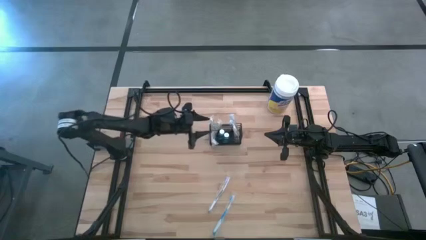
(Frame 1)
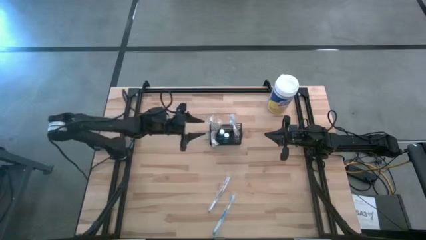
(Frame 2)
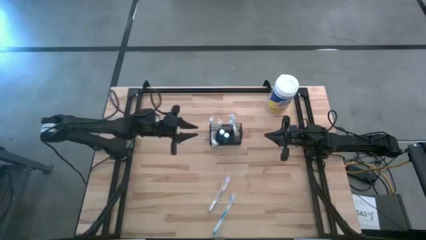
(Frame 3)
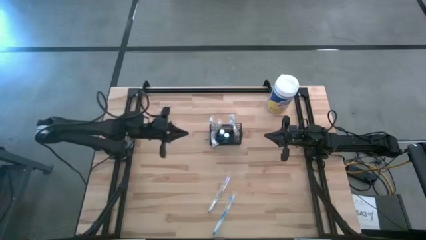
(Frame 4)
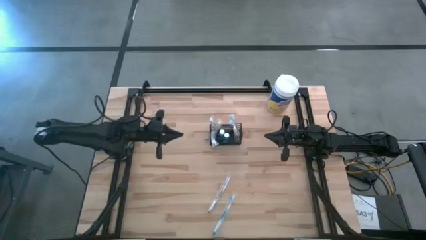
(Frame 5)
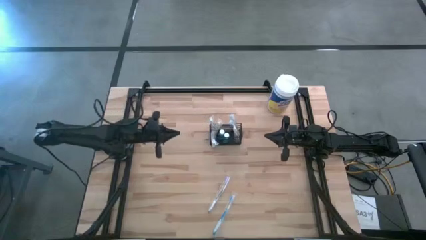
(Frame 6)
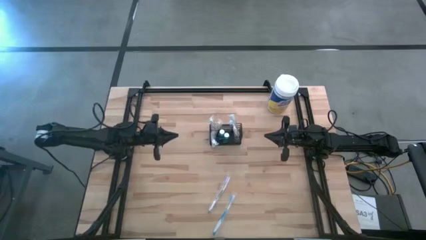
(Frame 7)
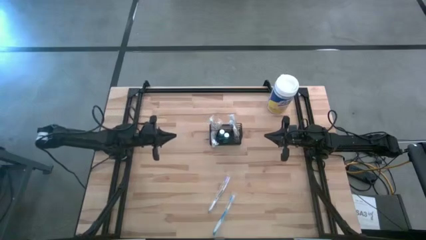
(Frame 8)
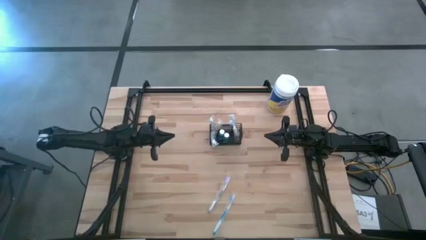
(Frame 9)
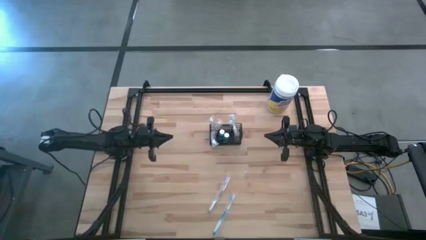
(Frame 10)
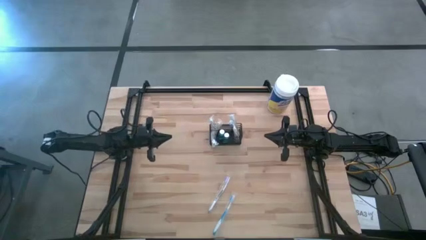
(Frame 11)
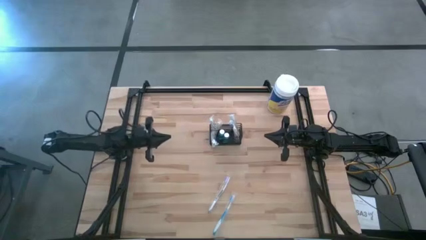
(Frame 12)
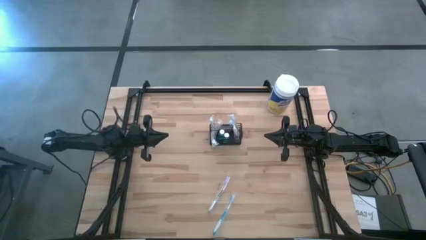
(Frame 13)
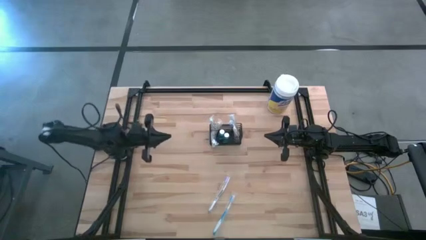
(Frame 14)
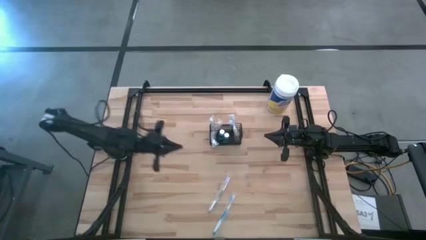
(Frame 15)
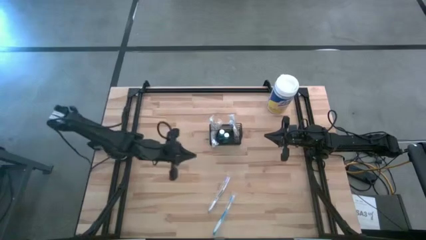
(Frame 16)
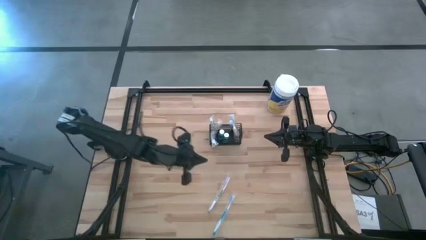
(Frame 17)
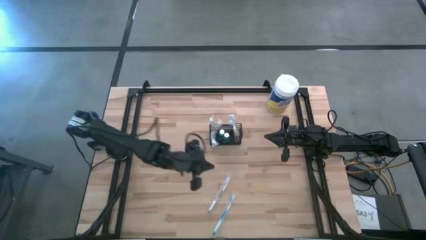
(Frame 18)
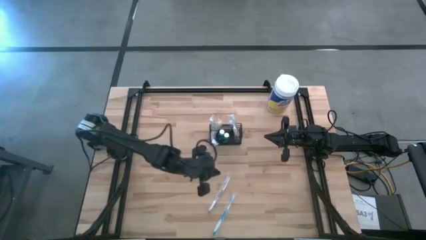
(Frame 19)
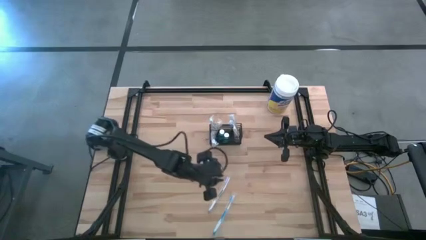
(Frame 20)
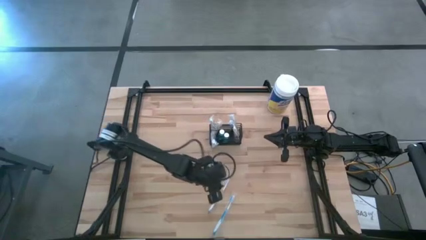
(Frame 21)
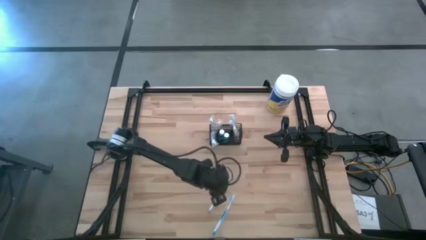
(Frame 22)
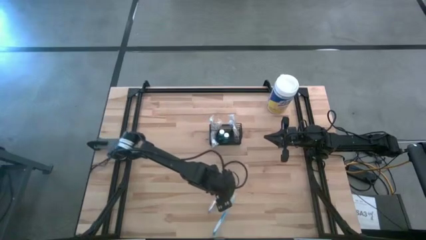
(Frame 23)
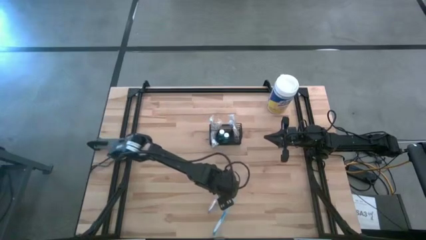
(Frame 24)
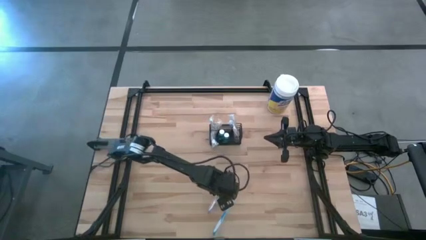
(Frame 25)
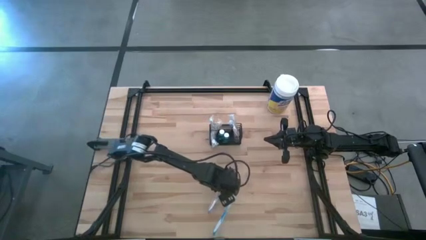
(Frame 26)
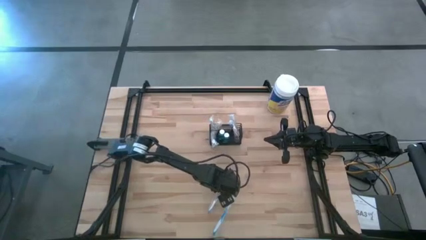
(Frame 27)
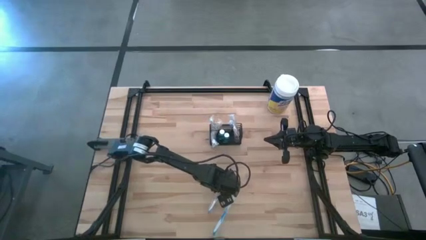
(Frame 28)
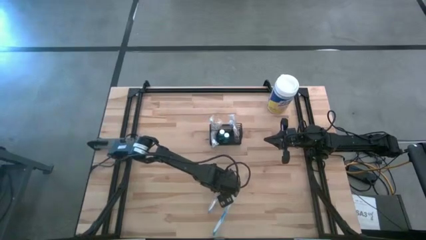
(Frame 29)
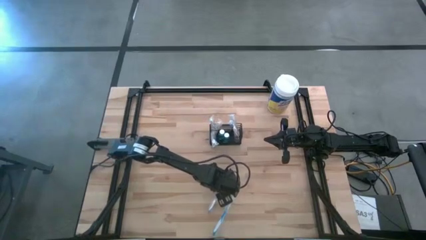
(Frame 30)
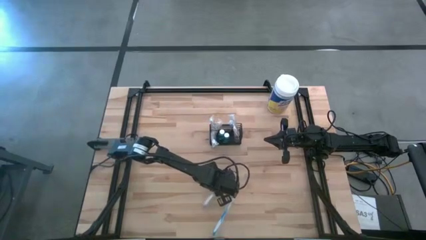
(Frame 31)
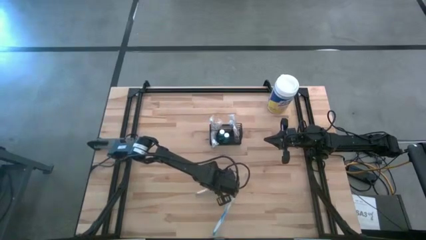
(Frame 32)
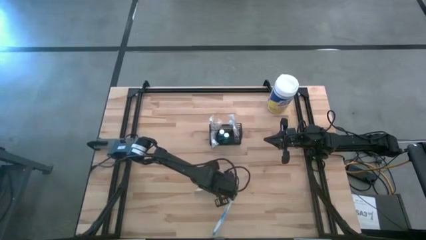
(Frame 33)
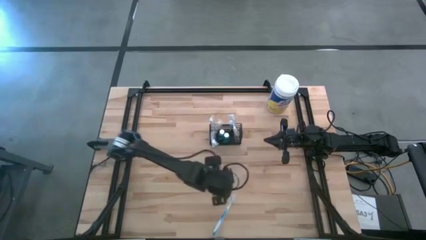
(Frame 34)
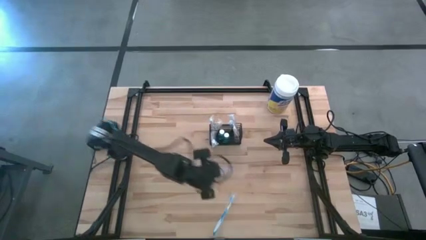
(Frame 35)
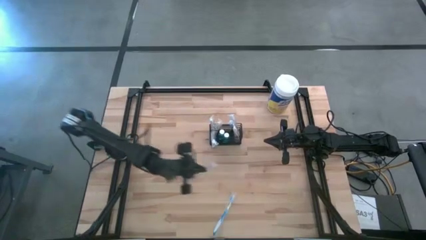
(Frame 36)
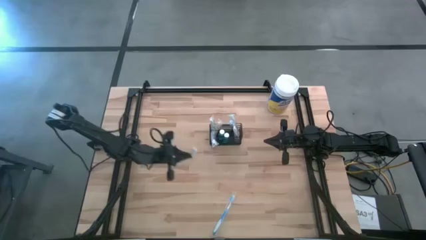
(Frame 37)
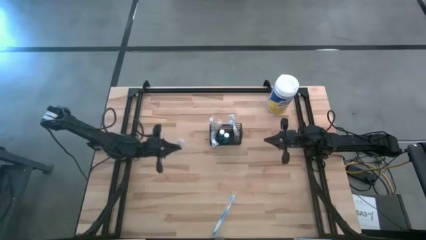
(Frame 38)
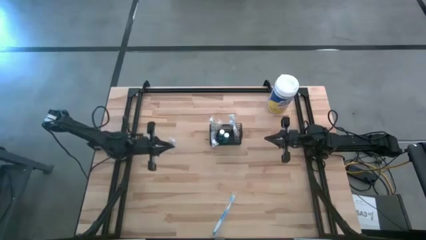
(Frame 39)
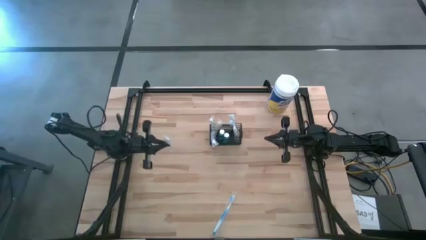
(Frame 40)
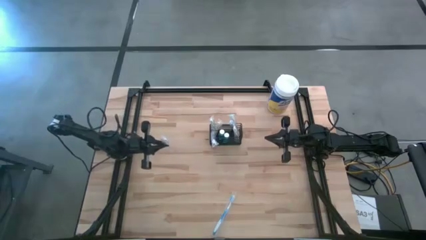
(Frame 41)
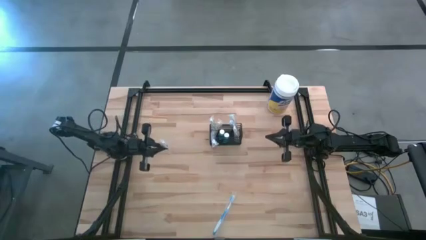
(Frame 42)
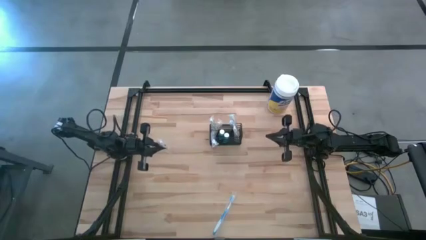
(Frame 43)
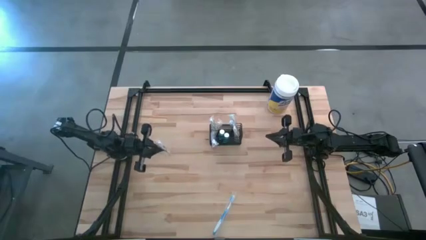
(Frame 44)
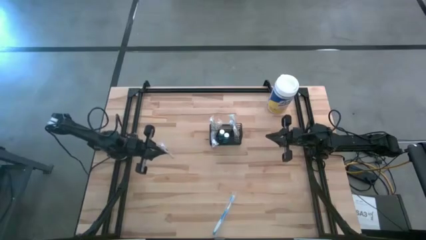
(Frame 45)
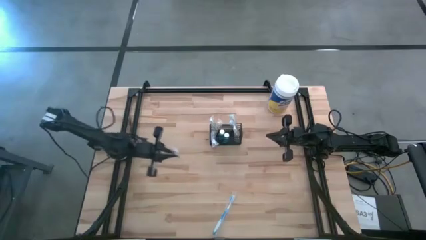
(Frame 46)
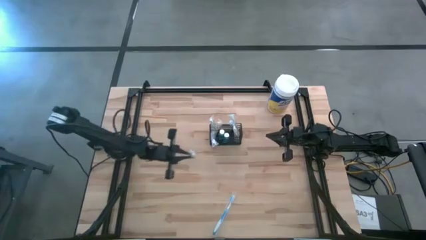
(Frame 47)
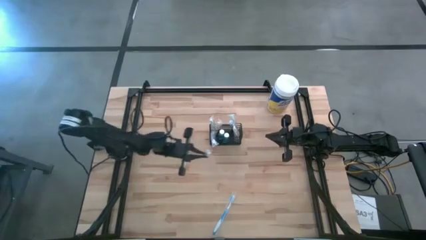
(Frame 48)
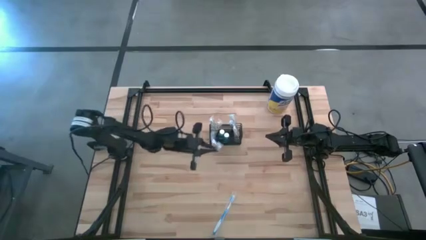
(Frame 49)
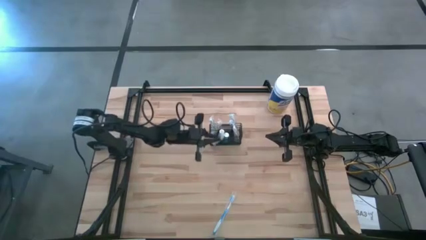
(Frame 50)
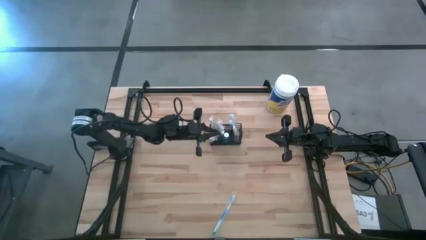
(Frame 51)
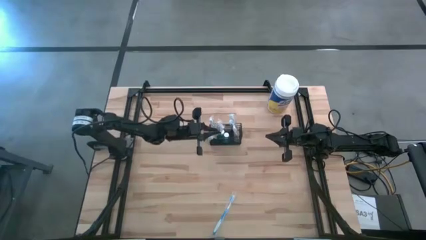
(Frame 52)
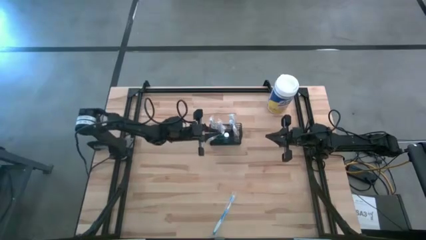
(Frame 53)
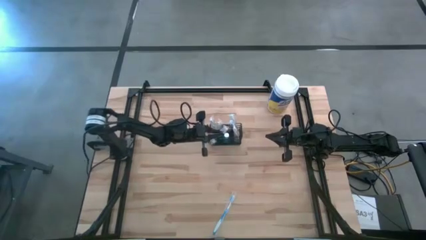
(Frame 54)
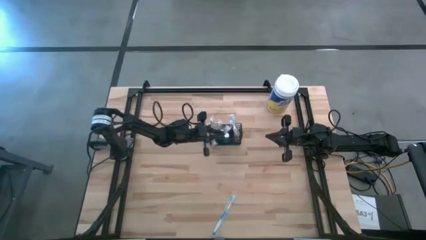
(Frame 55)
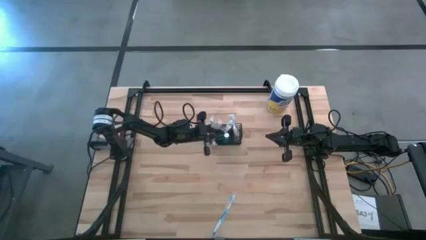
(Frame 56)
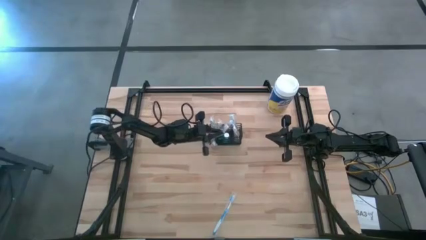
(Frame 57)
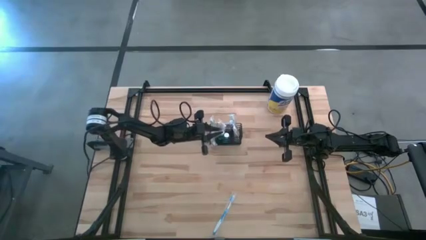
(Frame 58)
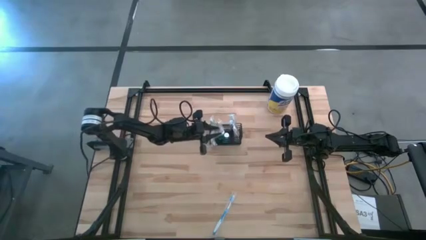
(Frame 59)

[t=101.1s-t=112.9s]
Task: Pick & Place toothbrushing station
Put the violet toothbrush into the black wire organizer
